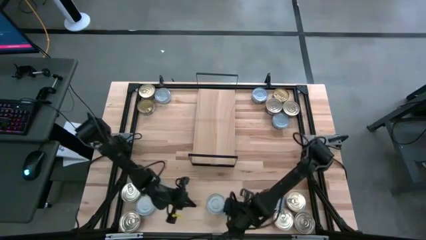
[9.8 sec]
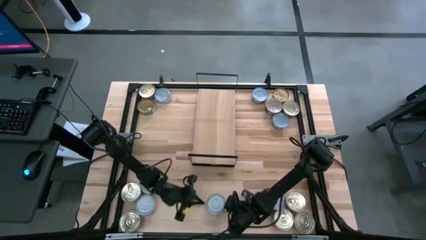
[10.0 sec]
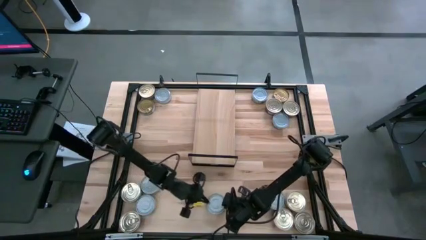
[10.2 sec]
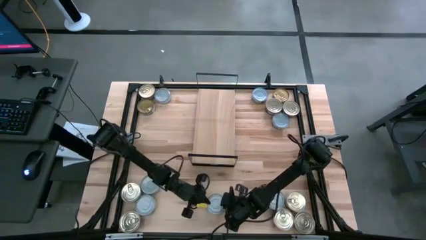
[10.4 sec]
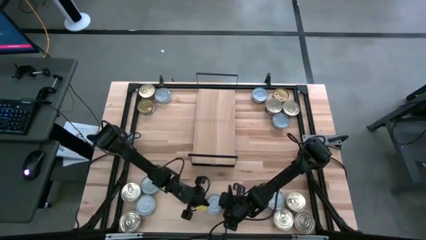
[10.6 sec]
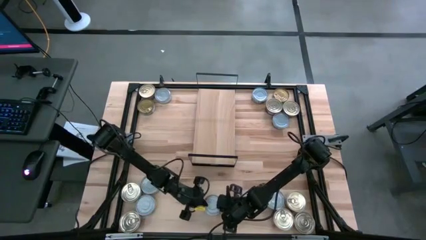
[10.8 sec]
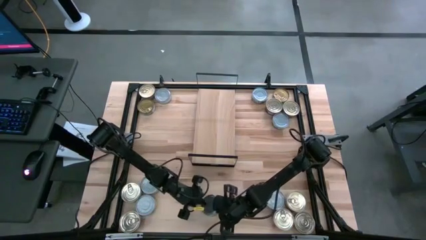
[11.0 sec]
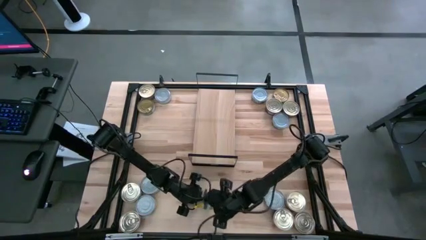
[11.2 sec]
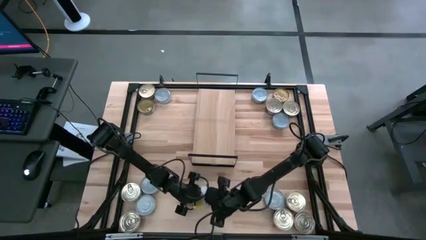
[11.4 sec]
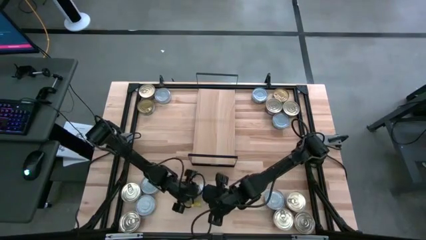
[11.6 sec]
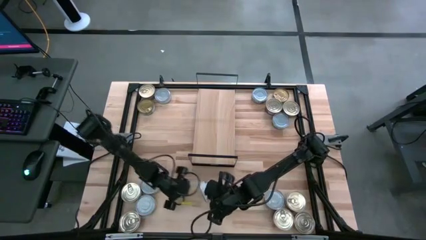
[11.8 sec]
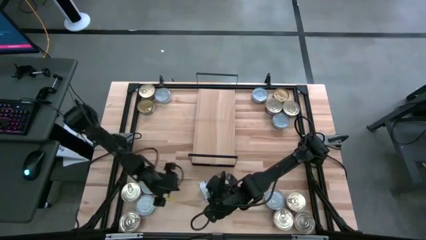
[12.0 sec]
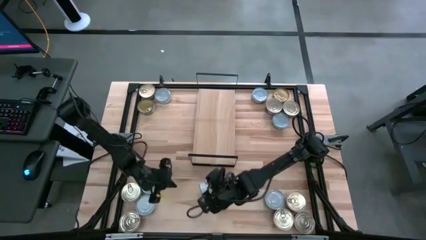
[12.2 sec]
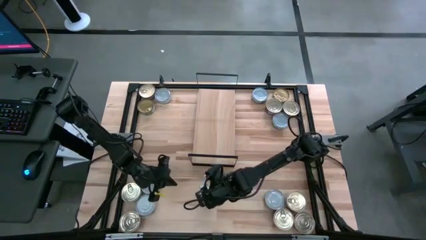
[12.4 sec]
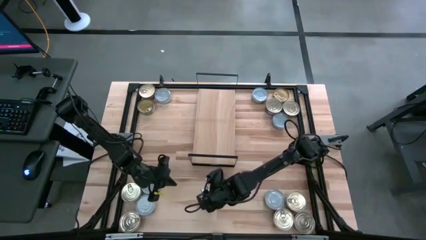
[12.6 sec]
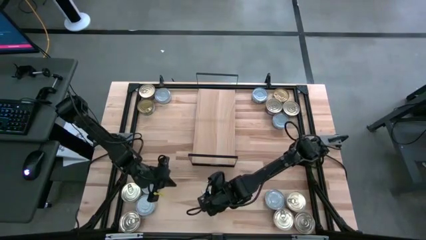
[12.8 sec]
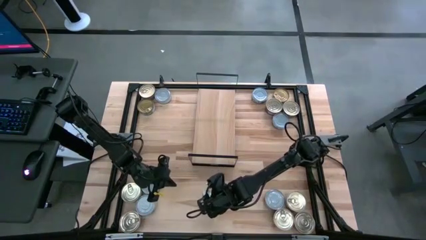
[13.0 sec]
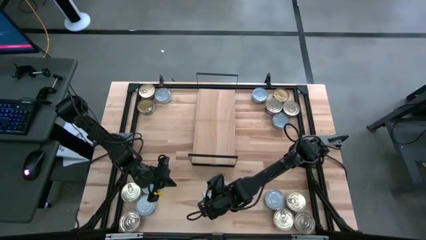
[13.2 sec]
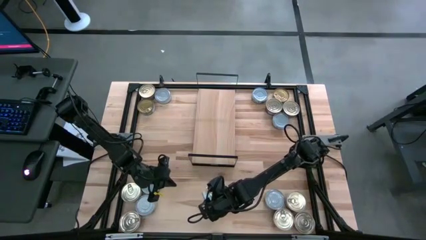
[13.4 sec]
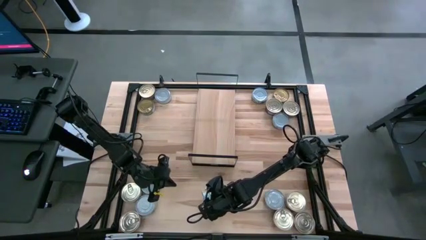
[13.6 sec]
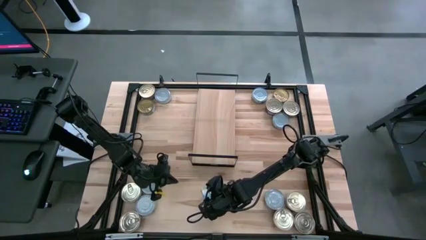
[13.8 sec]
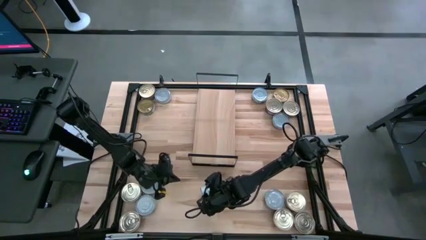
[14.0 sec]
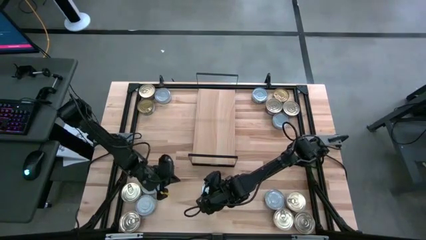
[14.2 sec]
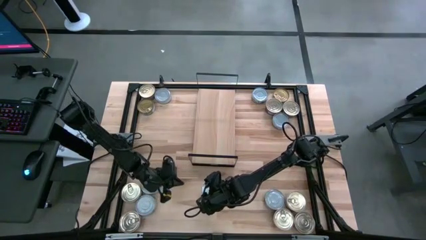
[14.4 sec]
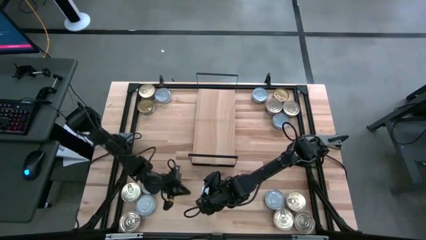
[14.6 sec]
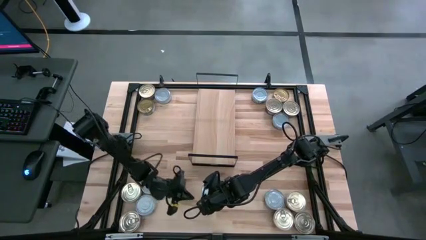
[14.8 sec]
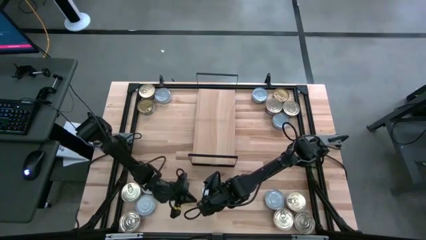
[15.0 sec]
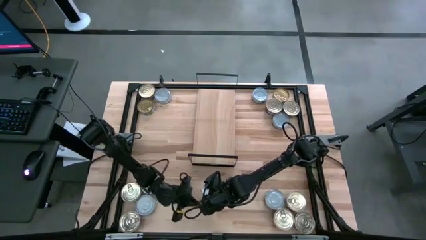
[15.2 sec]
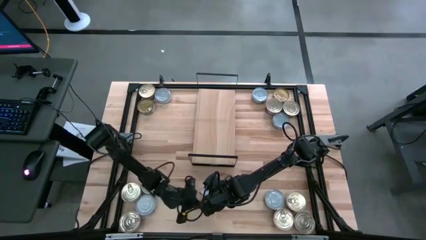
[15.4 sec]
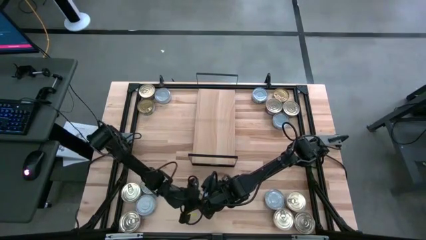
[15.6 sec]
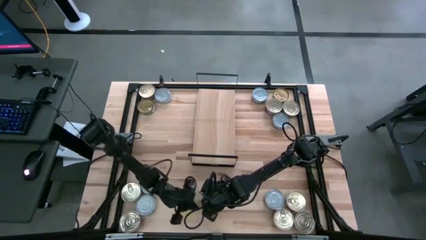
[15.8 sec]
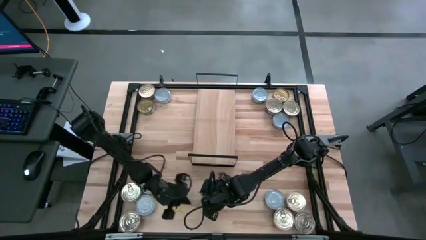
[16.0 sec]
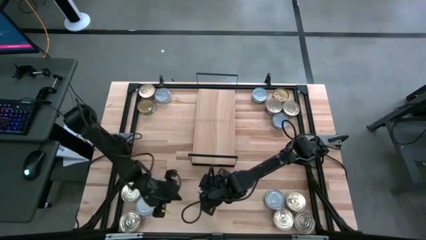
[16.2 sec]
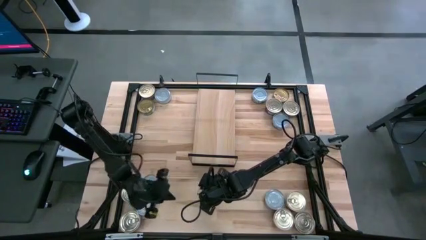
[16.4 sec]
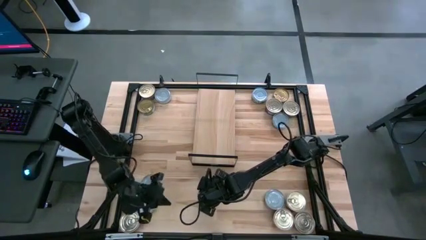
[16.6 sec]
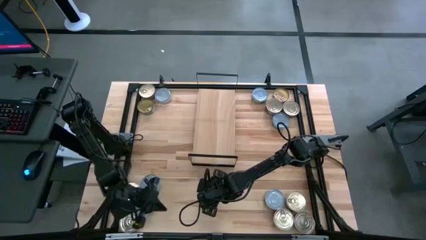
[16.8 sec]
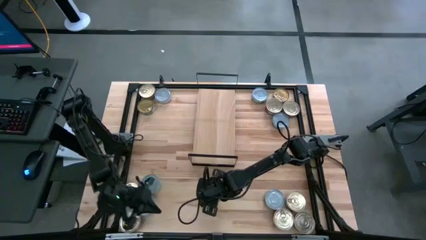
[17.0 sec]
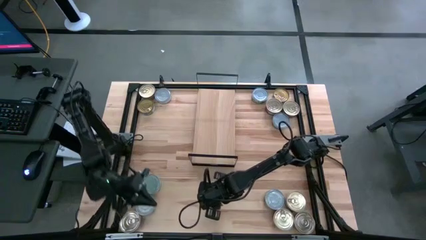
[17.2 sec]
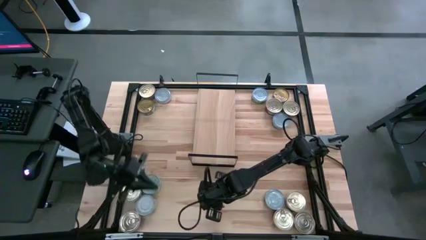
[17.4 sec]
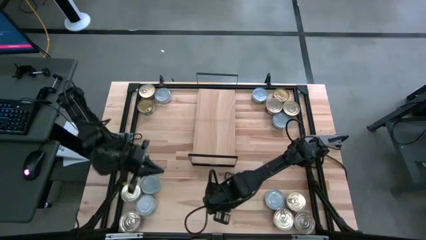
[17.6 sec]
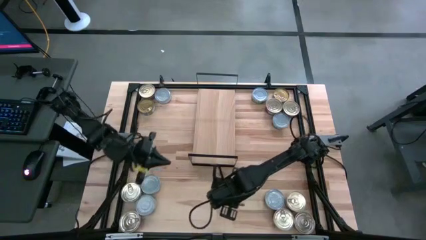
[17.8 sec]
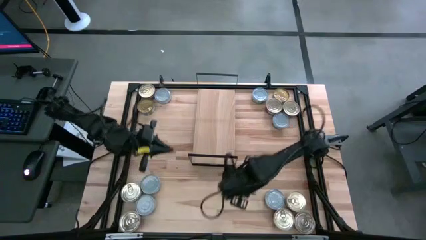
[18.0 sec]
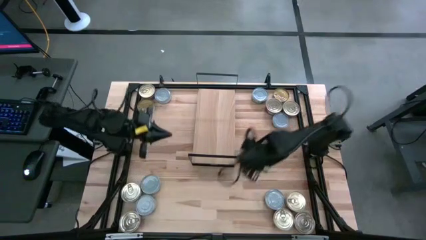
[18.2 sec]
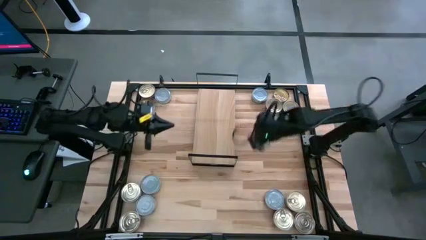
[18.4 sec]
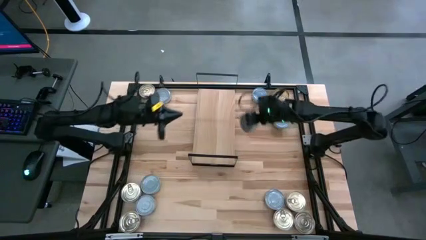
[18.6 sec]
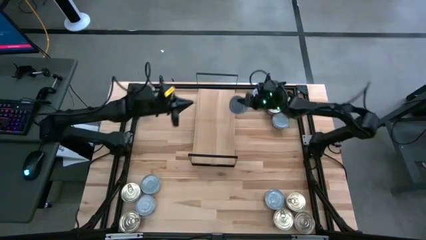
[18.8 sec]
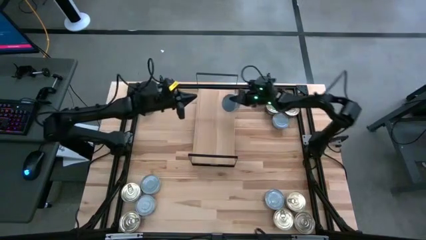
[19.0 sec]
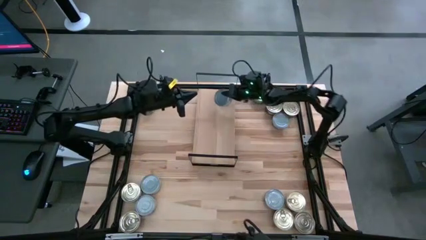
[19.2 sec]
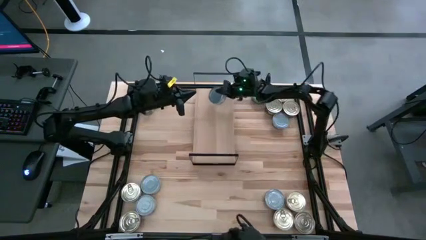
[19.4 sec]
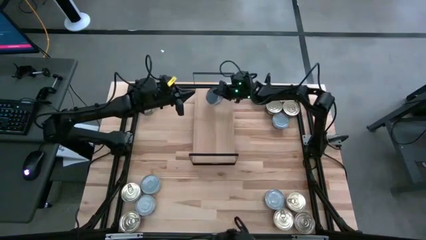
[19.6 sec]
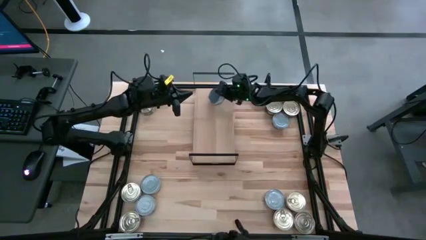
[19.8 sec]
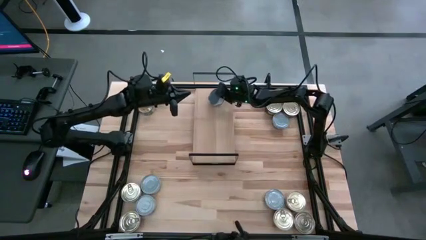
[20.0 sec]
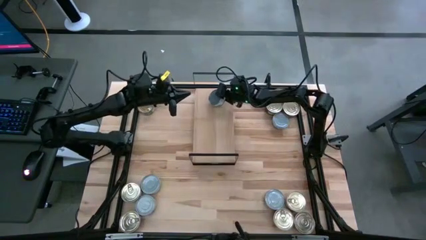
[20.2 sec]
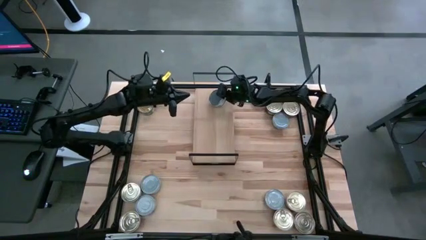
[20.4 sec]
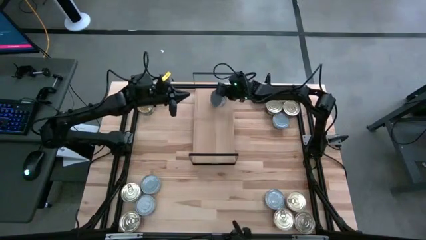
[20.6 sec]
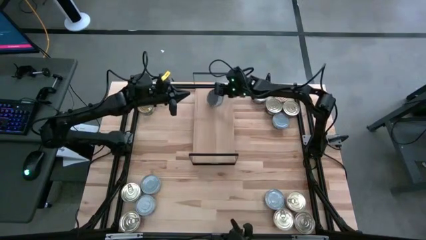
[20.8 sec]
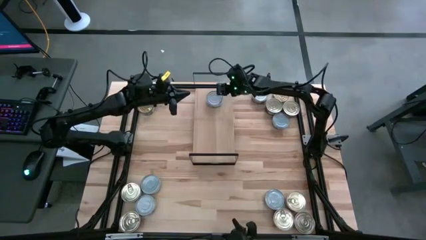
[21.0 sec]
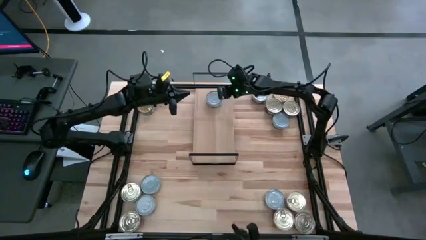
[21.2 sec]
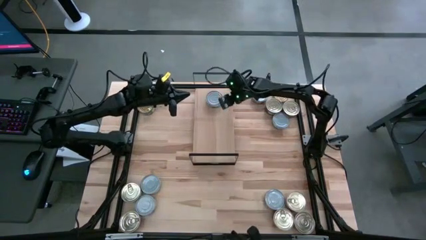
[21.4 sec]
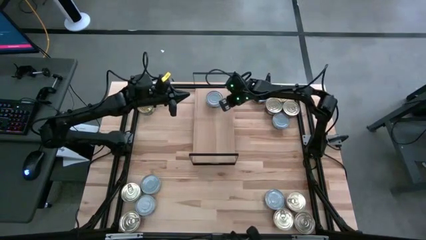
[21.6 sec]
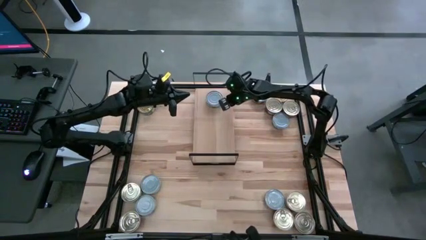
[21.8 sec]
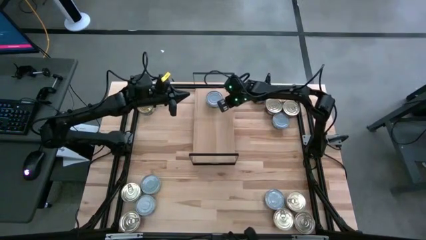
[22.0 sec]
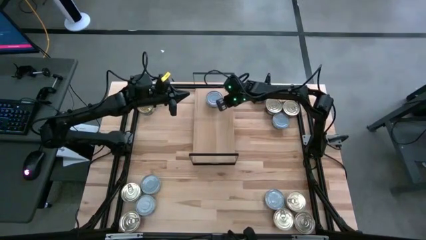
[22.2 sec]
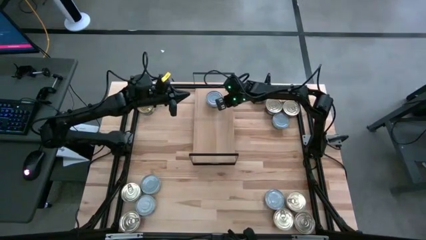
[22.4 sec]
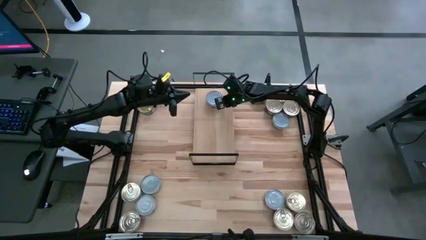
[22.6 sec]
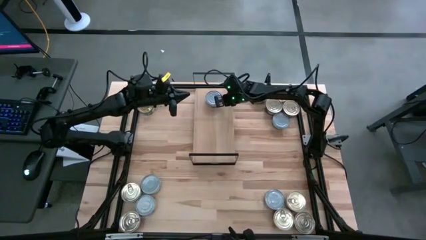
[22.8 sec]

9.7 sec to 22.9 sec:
Task: Stack canned seafood by type on shelf
Put the green tuna cans on the shelf

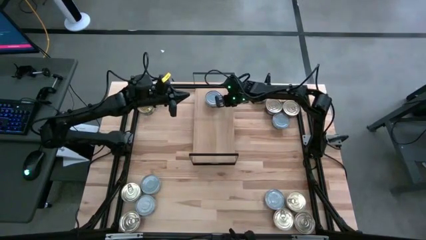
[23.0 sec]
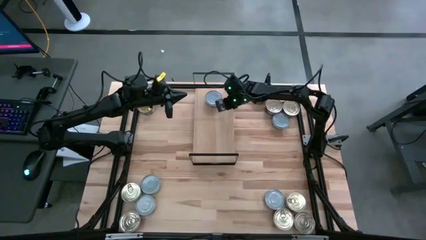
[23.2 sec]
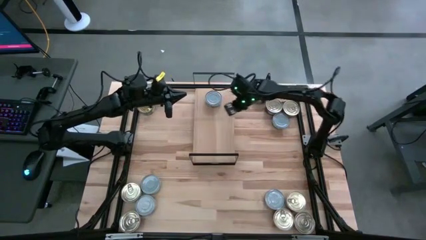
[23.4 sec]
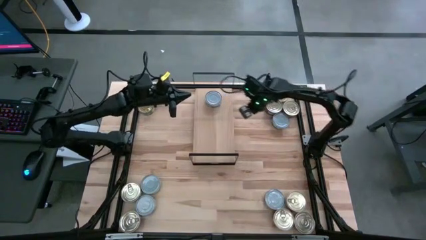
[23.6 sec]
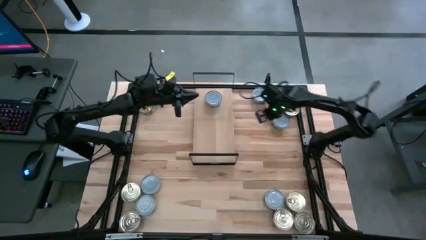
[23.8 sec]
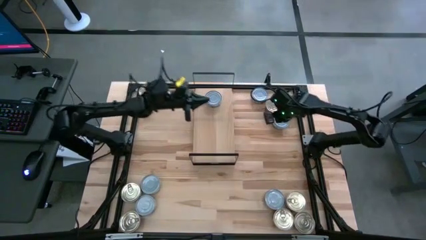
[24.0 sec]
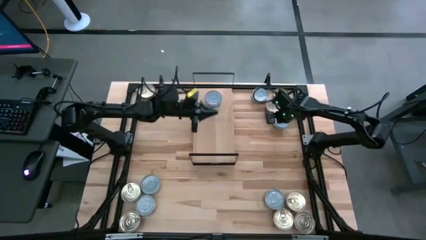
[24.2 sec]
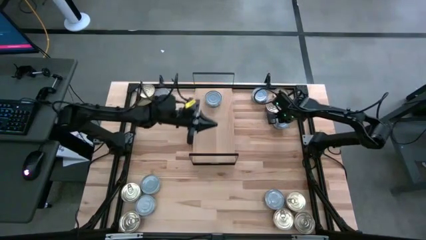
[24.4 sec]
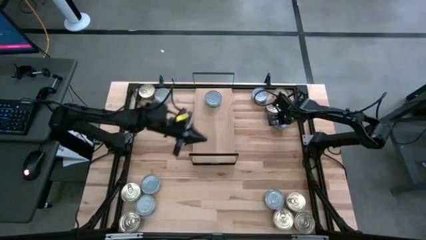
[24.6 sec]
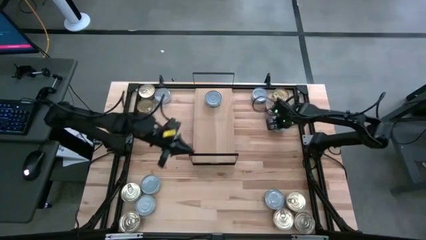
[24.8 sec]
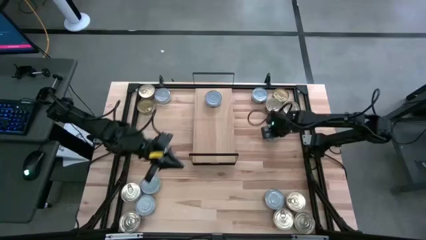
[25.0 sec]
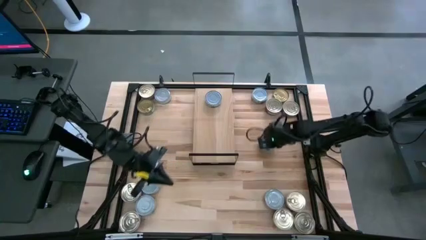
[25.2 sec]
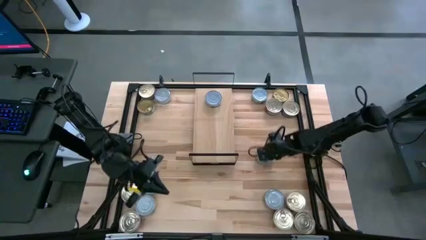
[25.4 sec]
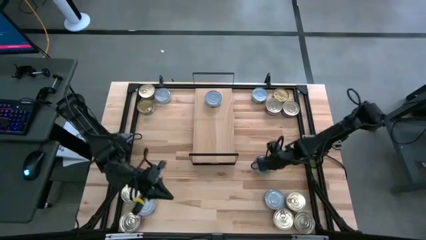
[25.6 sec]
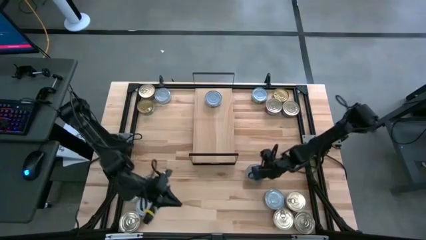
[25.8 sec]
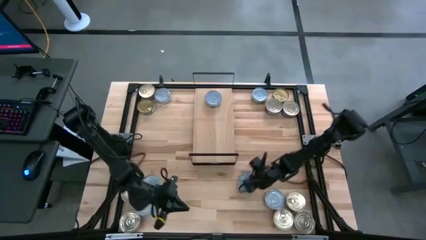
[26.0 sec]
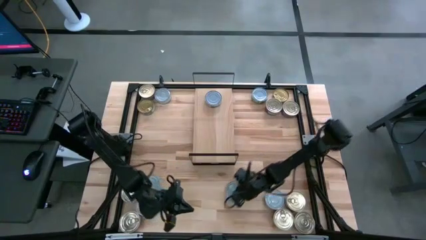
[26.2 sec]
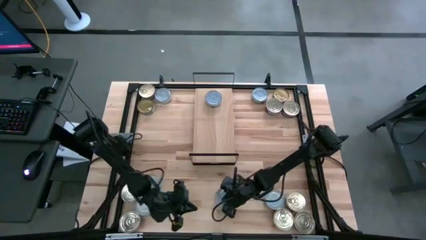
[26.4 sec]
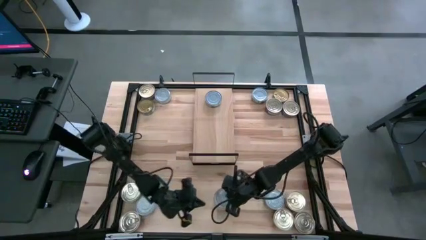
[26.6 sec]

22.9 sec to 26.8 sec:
Move the green tuna can to the bottom middle of the table
